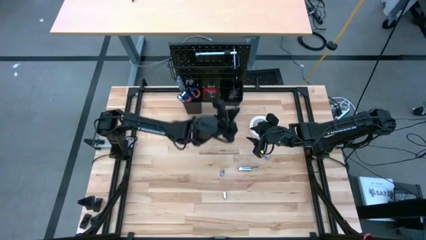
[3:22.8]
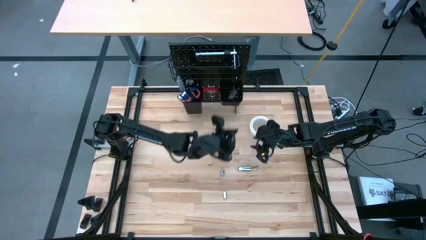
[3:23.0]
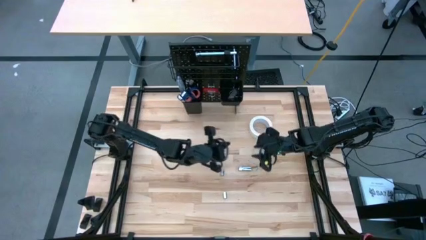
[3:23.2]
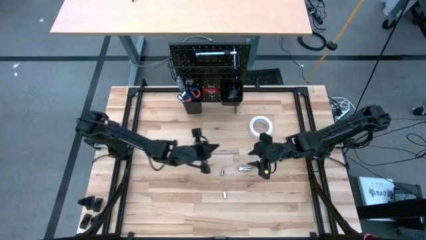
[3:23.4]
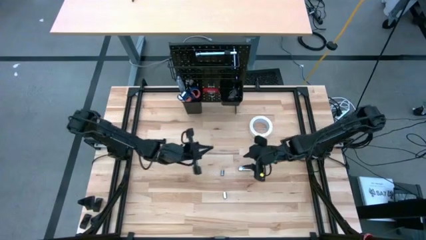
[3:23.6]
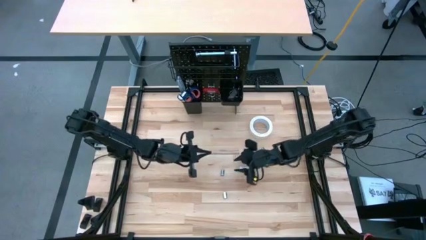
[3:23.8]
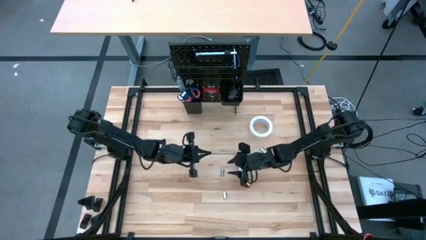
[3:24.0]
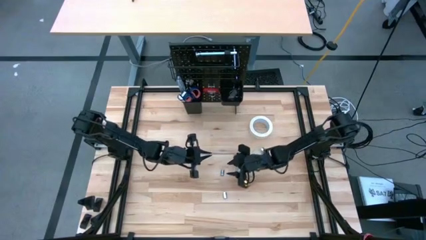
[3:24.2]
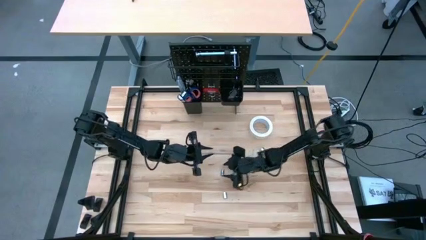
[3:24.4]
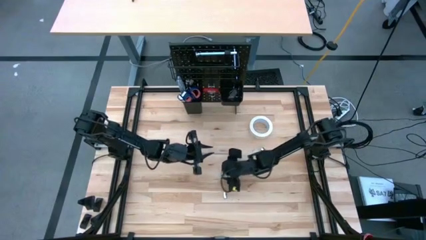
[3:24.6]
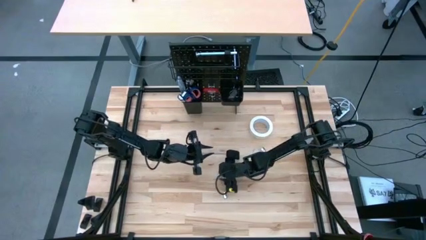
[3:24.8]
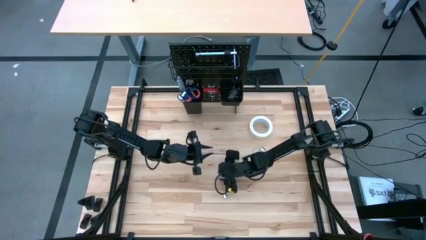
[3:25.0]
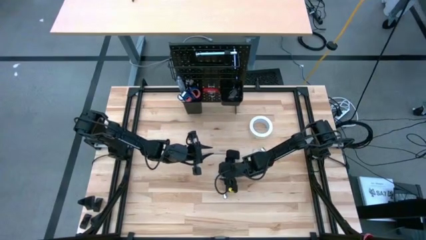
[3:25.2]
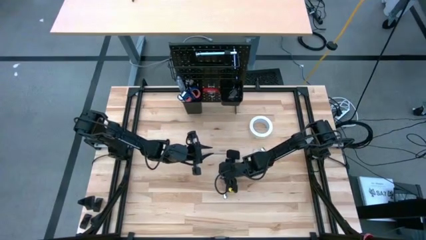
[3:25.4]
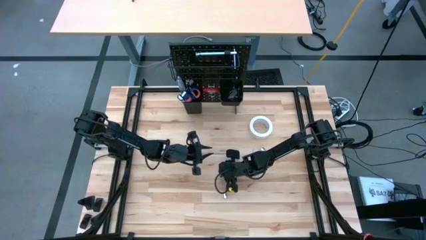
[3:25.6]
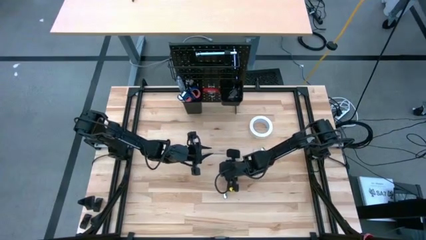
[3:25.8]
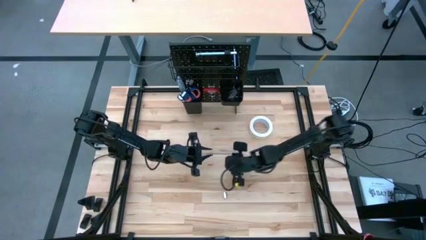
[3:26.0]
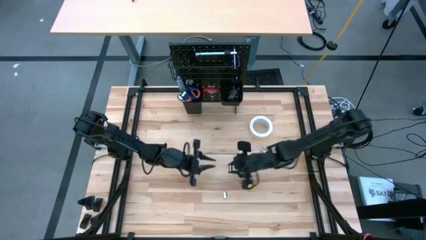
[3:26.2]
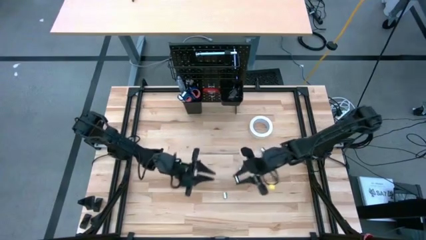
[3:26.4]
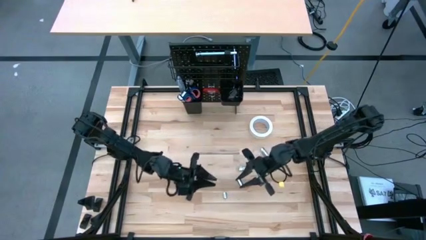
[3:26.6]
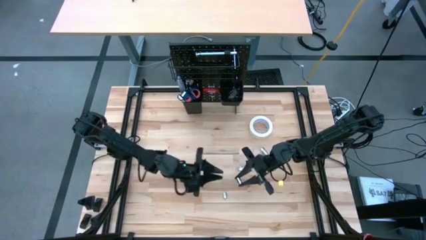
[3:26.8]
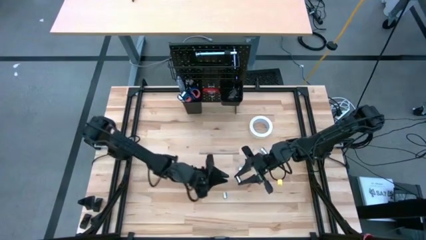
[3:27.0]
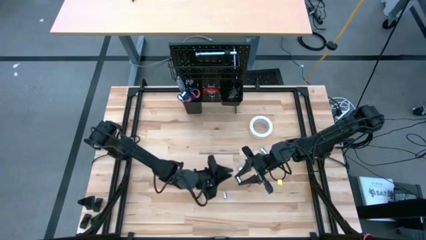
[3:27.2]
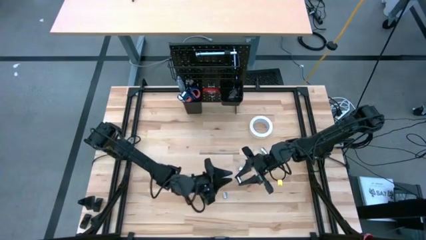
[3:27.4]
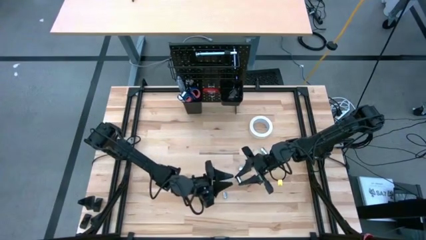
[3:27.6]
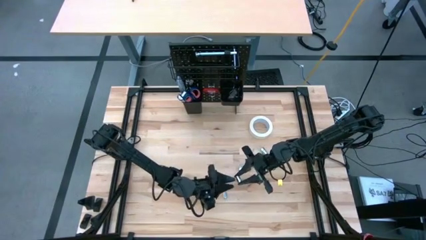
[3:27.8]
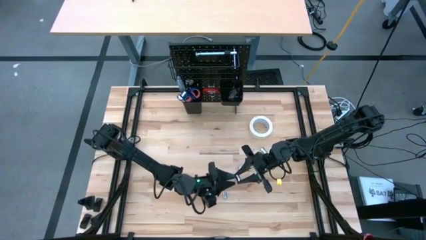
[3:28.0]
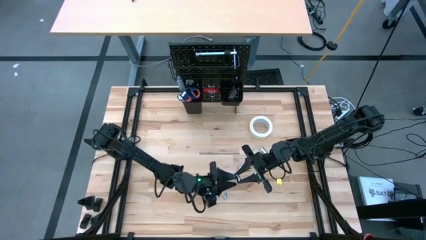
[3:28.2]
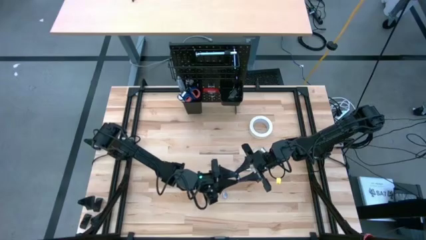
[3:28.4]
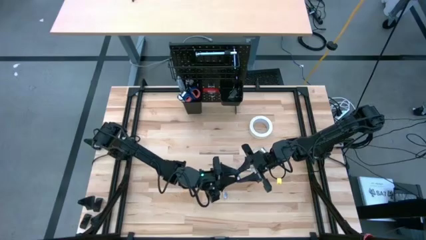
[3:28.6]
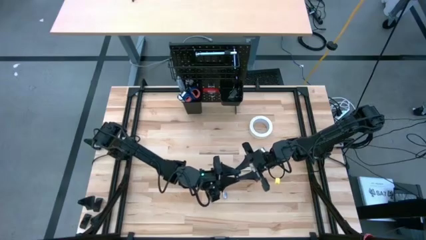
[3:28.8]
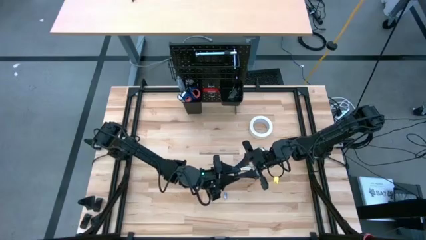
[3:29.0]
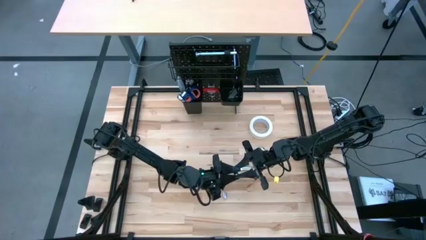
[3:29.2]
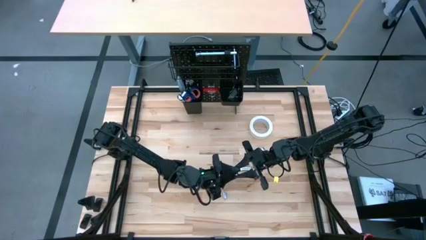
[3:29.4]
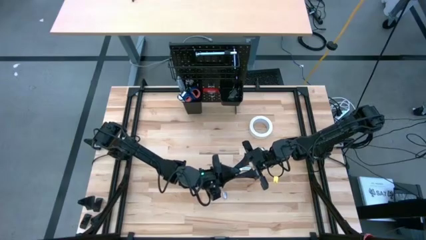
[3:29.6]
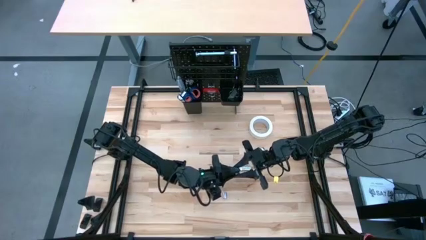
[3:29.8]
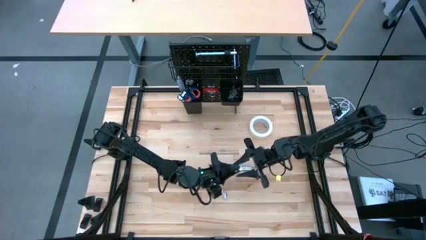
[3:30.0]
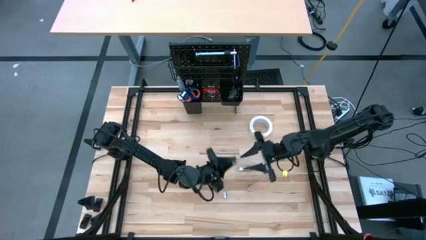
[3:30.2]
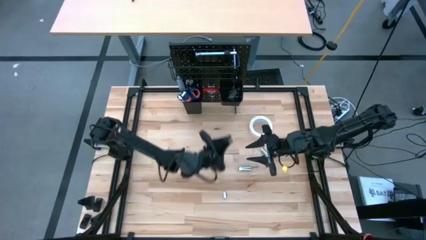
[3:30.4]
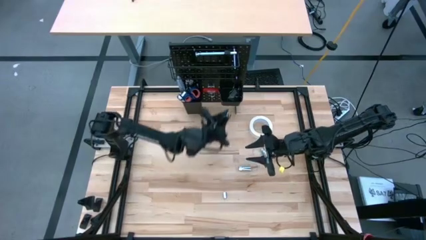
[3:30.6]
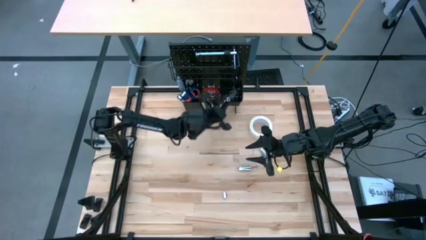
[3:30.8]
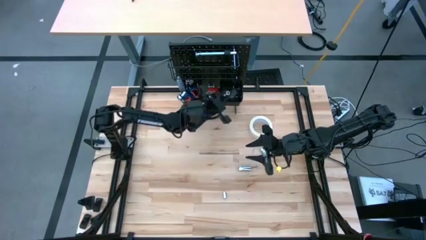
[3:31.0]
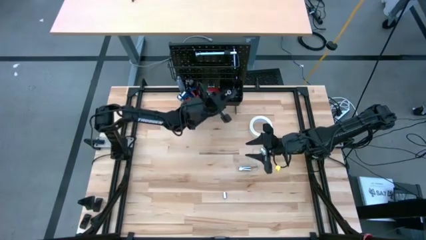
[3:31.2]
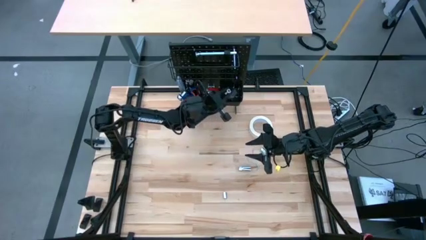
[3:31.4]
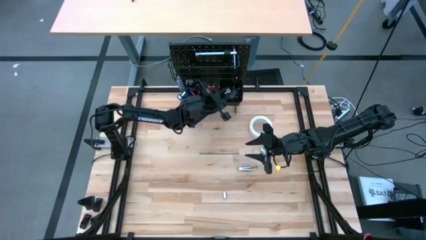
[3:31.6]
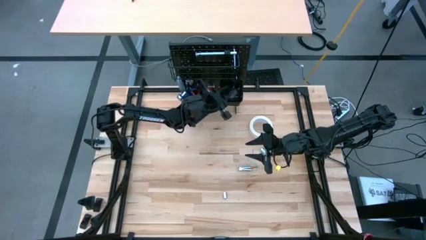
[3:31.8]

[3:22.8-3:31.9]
Task: Hang tools onto peg board
Put the middle left socket into the right black bin on the peg board

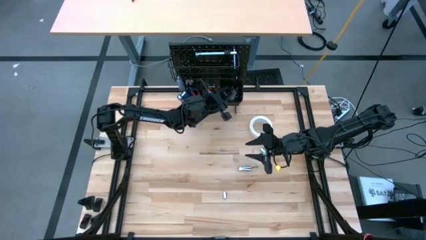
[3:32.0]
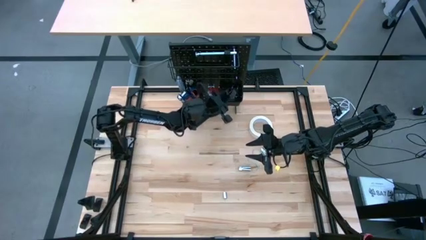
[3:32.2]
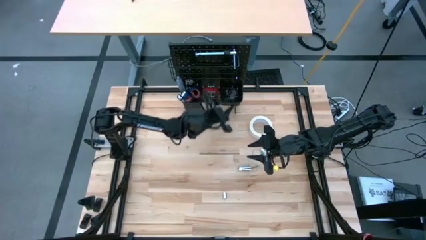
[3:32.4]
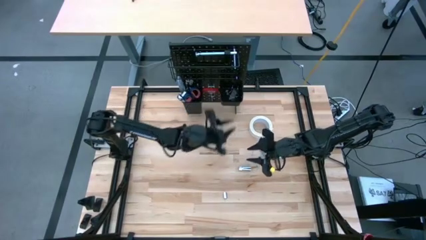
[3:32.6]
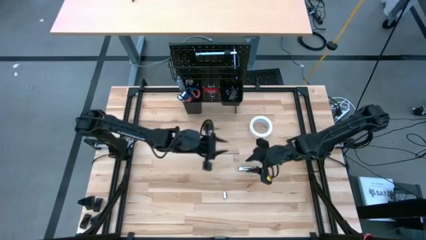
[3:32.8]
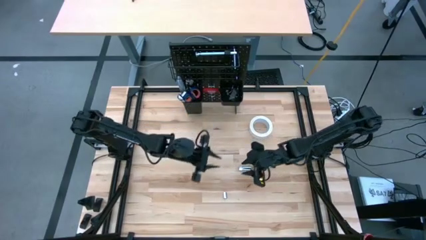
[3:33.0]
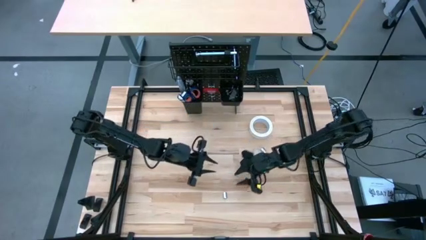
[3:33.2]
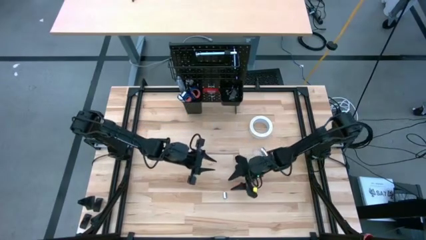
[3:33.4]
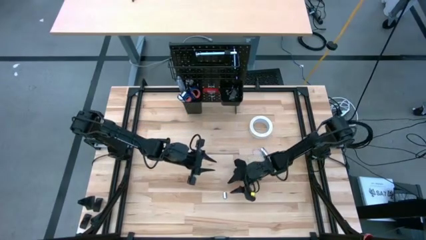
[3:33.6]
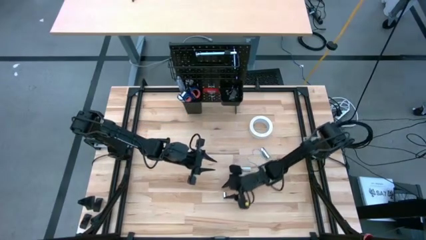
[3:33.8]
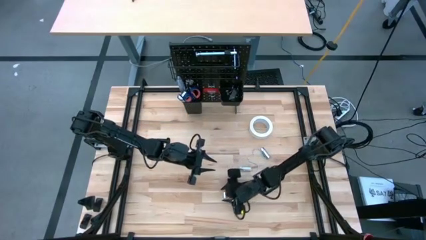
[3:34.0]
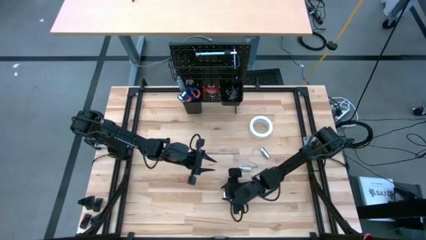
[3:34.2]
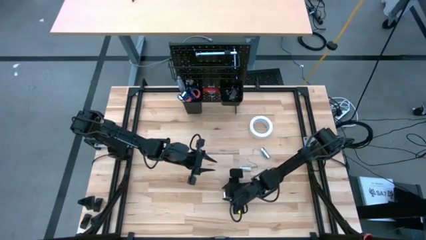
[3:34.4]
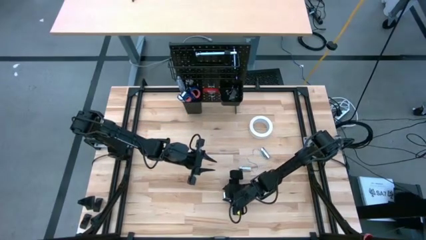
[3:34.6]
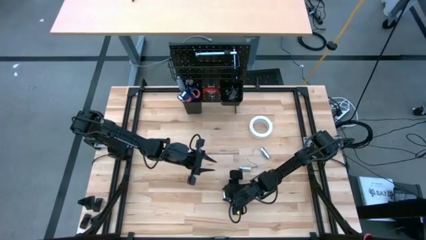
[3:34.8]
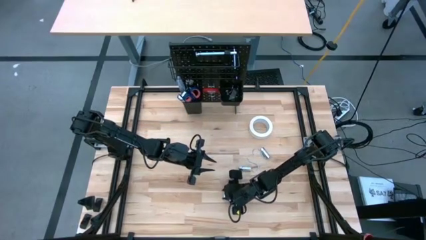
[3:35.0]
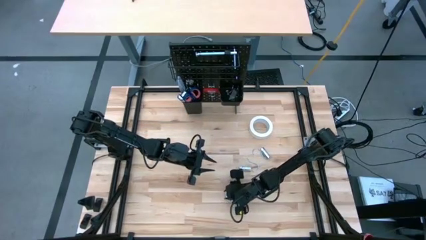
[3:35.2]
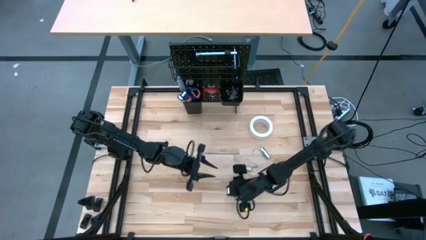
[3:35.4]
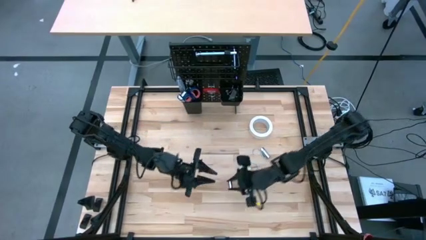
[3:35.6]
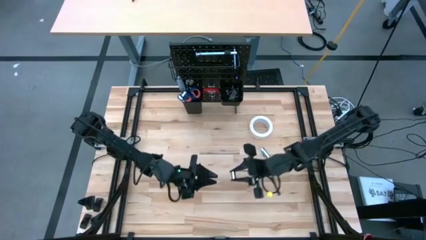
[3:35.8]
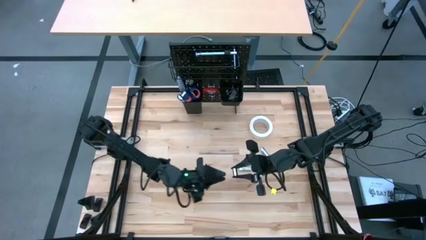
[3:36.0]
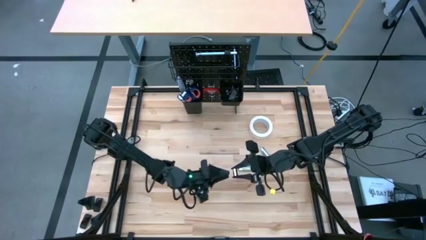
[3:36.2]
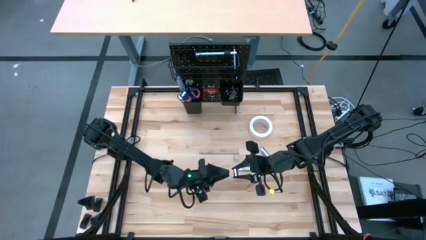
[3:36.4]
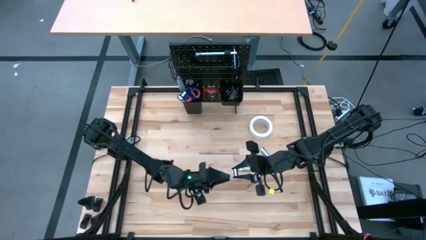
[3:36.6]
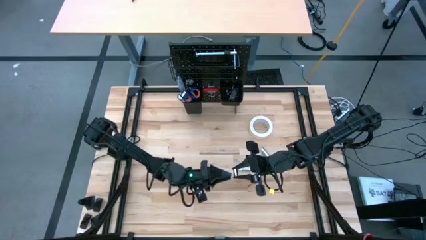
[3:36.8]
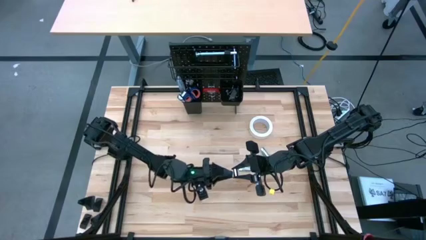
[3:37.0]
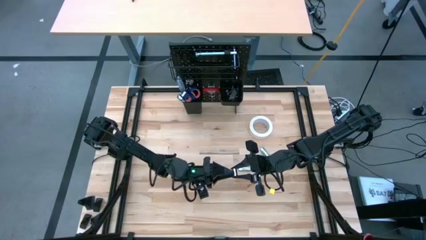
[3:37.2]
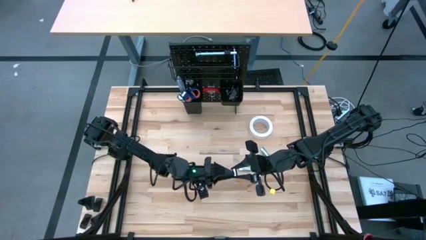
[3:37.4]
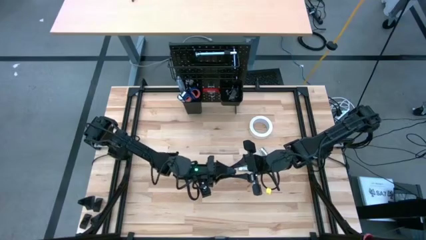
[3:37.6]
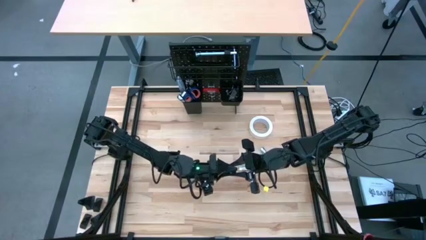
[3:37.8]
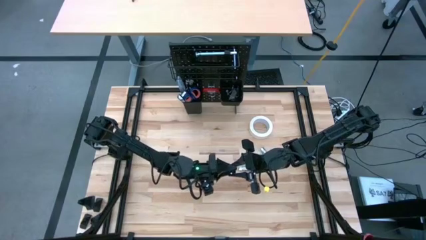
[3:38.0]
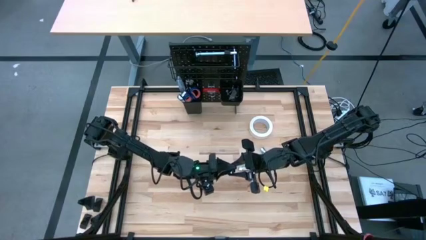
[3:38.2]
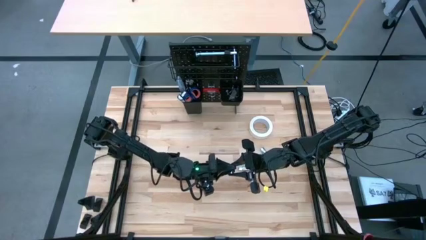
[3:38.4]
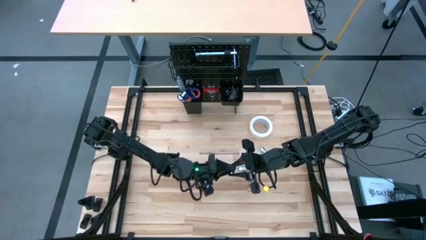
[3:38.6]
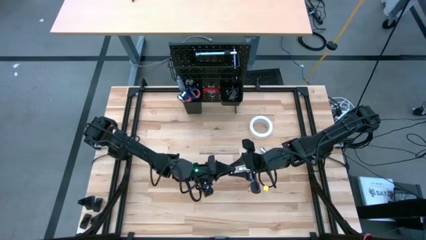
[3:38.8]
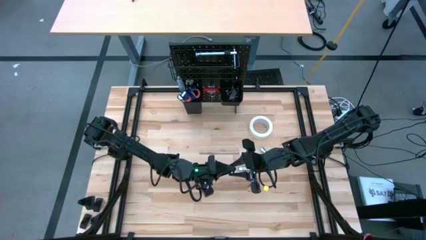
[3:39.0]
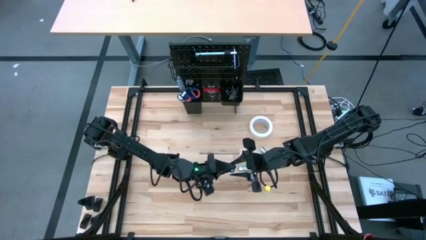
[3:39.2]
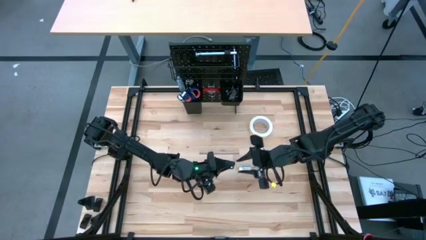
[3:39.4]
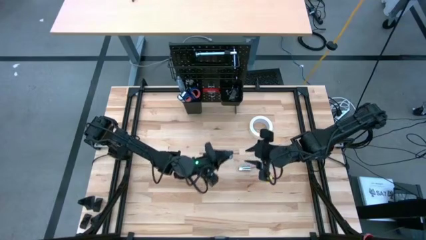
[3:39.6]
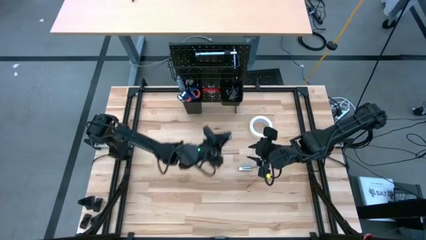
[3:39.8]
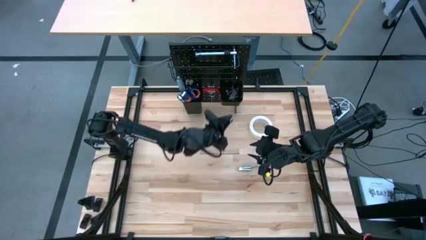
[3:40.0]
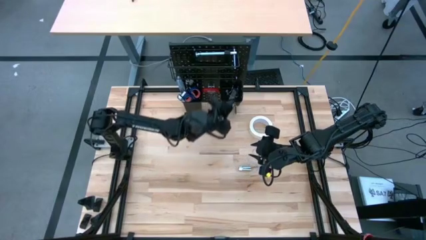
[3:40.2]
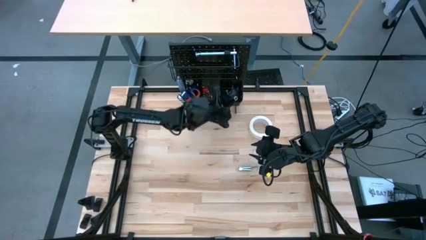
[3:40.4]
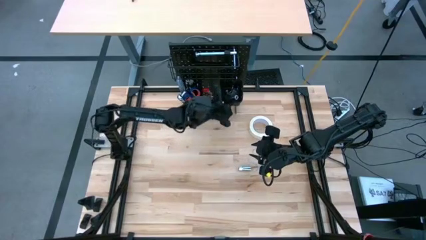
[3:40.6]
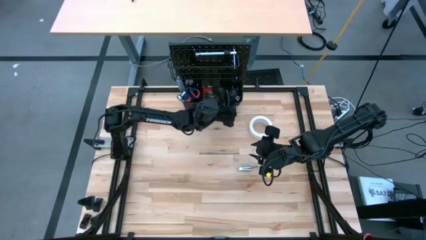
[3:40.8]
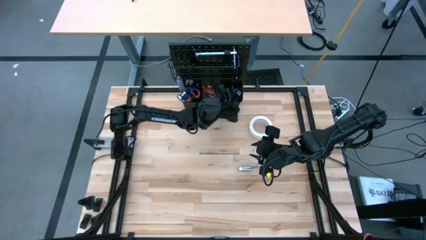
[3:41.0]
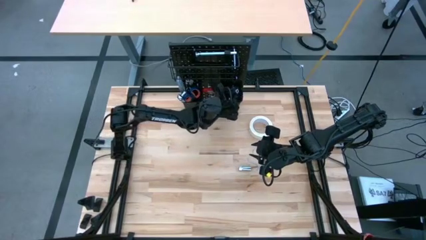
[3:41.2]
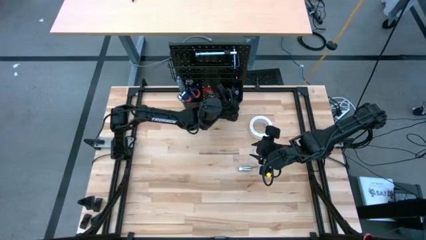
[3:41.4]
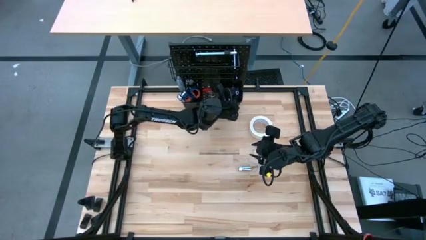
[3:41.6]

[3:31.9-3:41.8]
Put the bottom socket into the right black bin on the peg board
